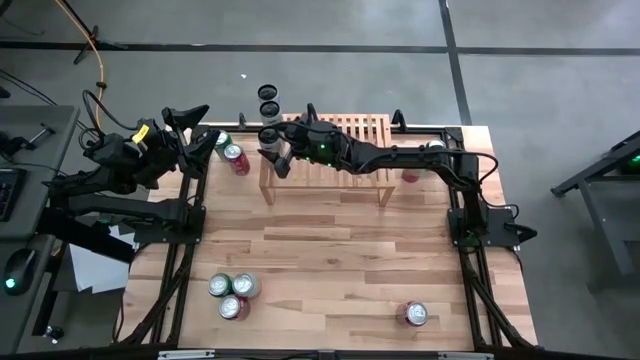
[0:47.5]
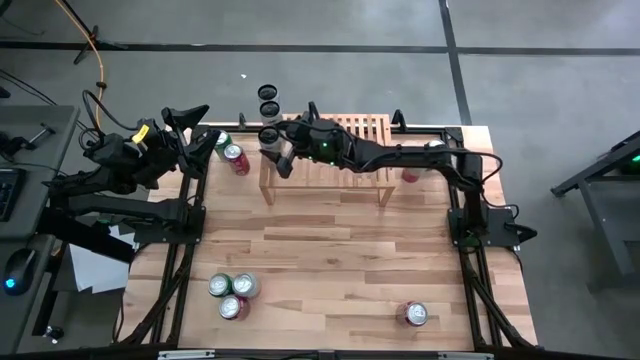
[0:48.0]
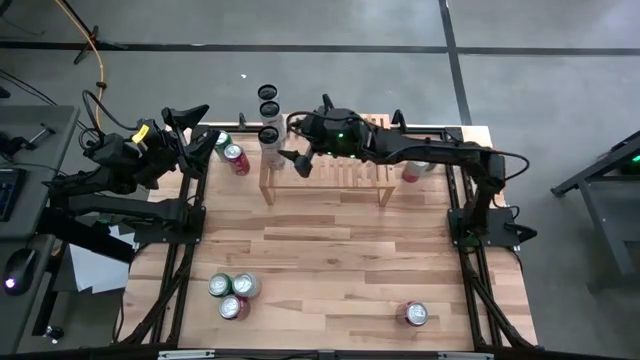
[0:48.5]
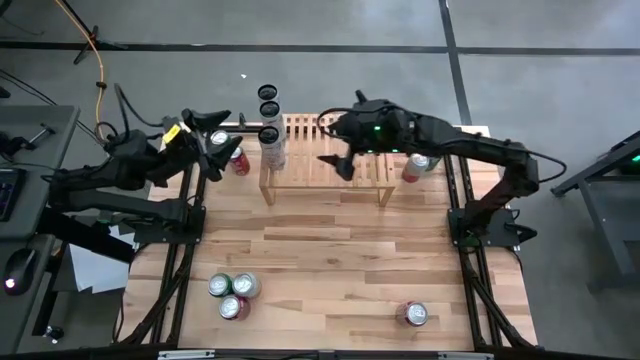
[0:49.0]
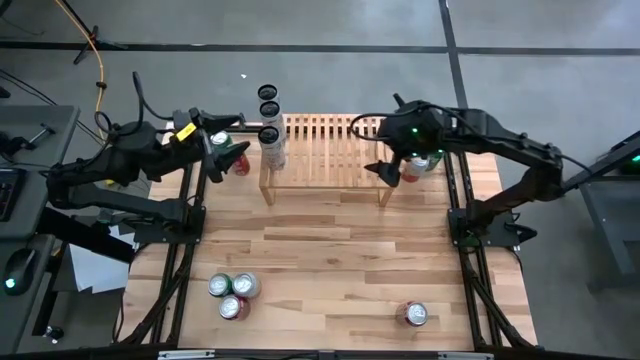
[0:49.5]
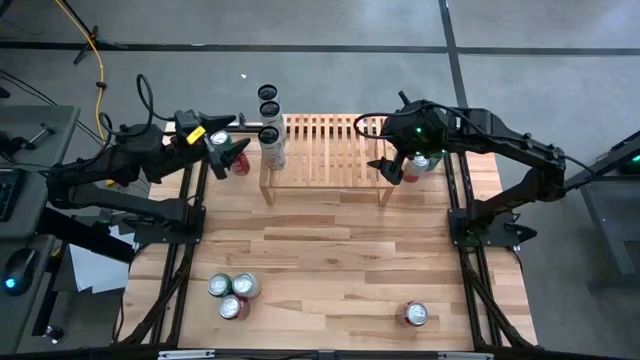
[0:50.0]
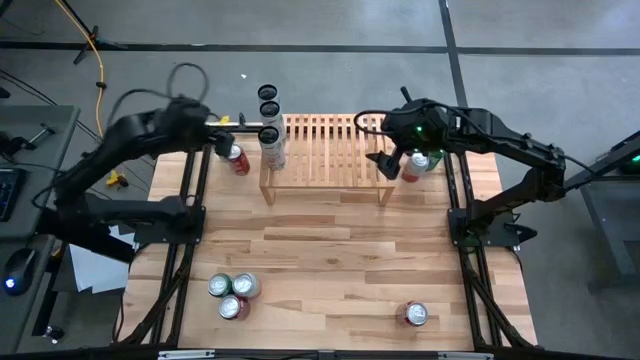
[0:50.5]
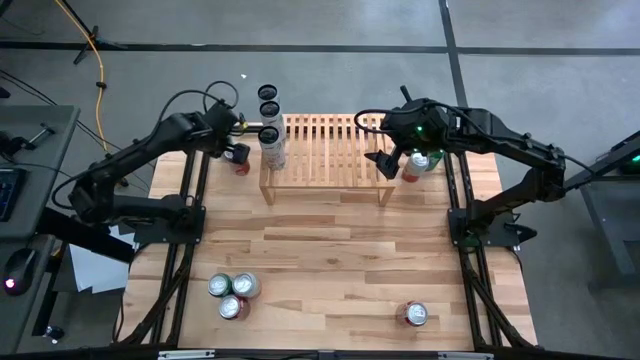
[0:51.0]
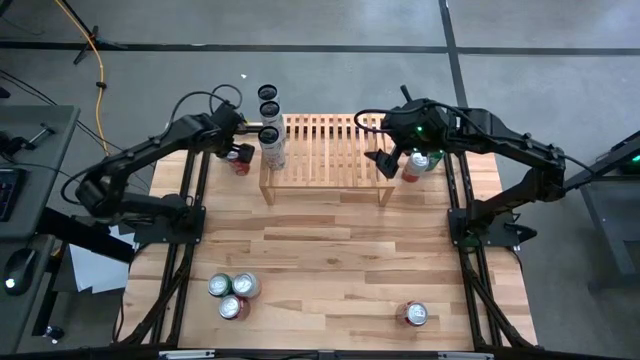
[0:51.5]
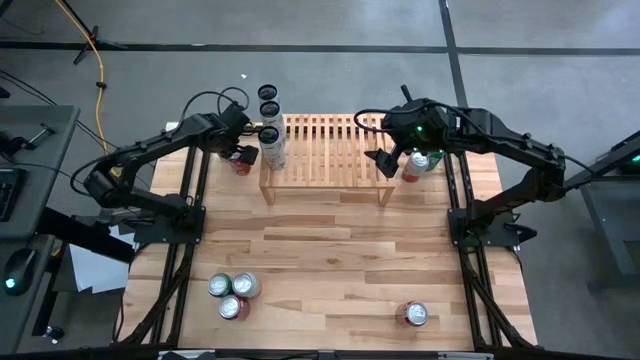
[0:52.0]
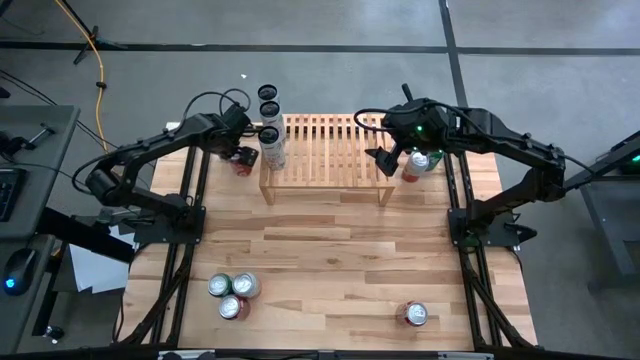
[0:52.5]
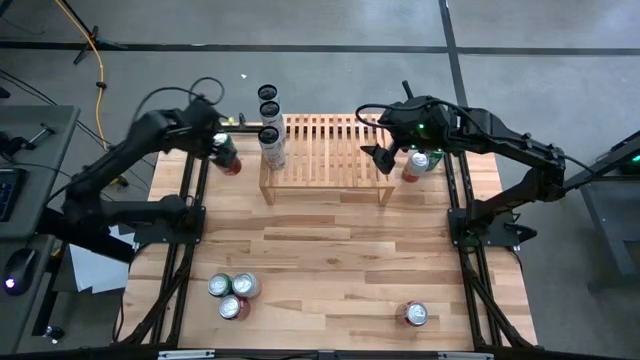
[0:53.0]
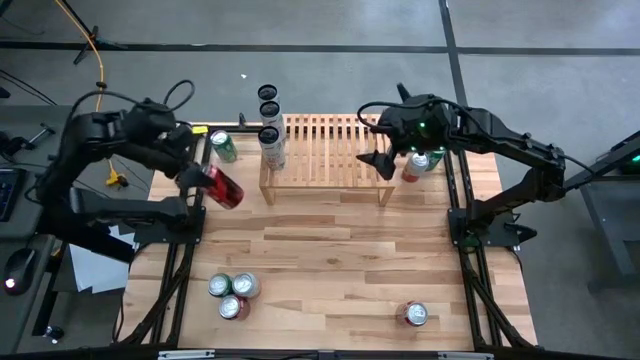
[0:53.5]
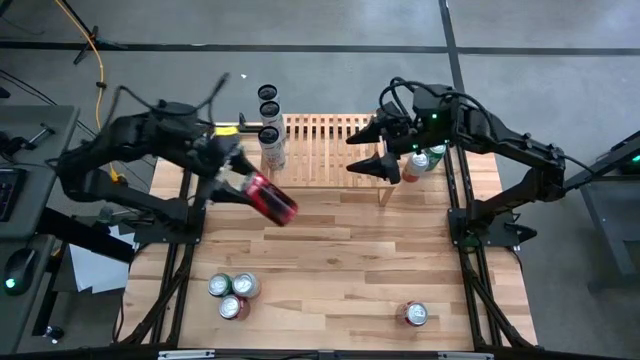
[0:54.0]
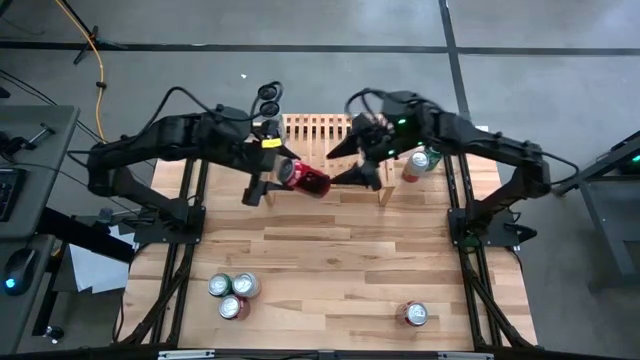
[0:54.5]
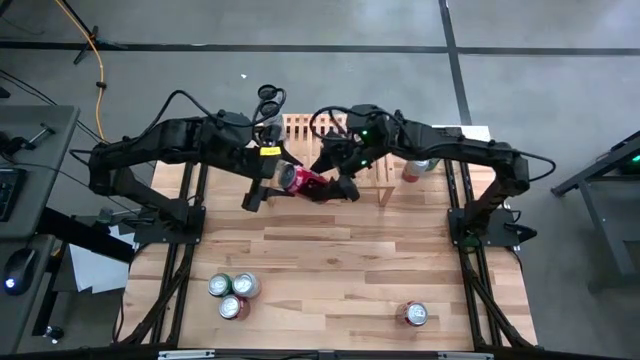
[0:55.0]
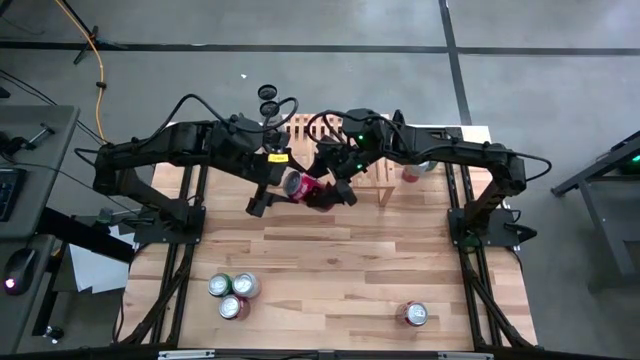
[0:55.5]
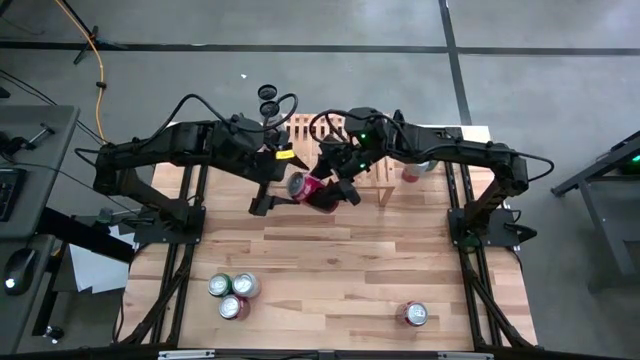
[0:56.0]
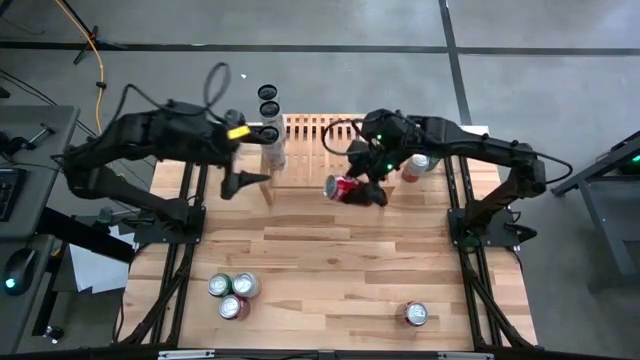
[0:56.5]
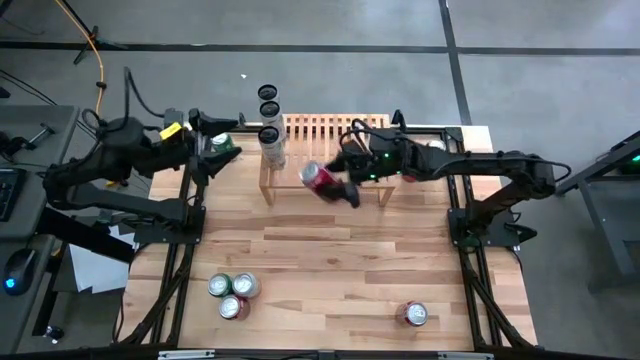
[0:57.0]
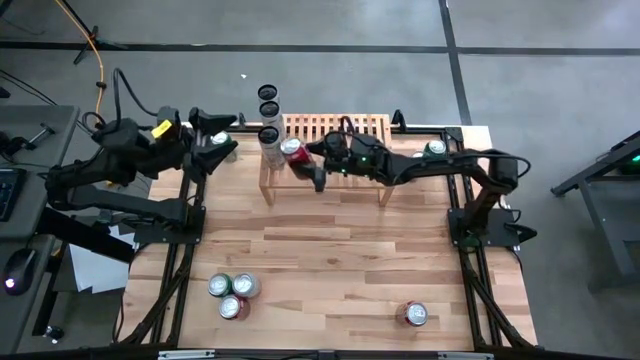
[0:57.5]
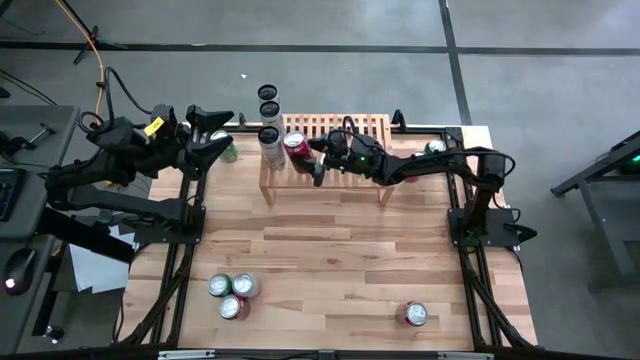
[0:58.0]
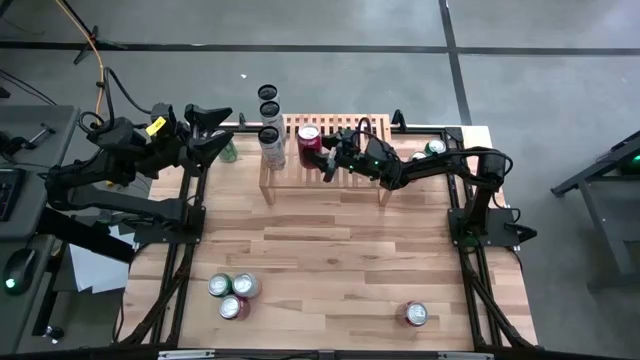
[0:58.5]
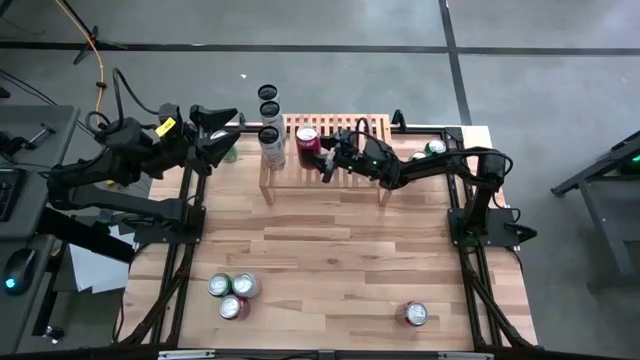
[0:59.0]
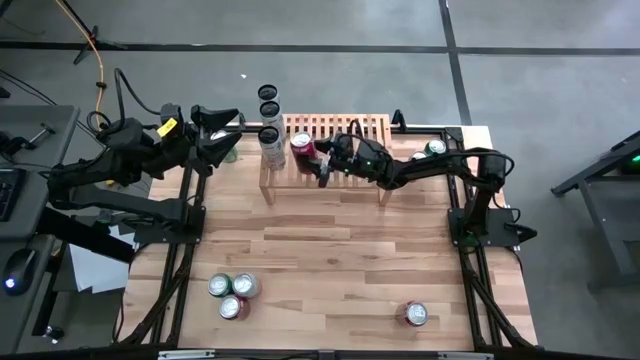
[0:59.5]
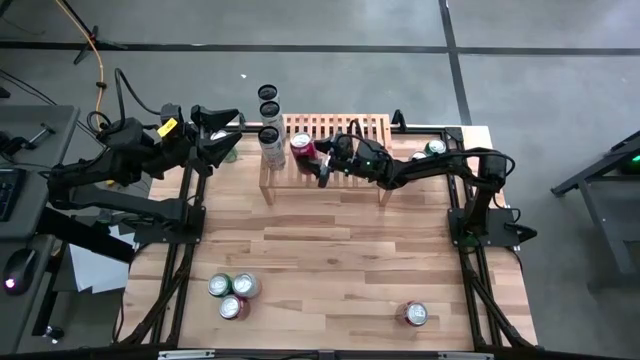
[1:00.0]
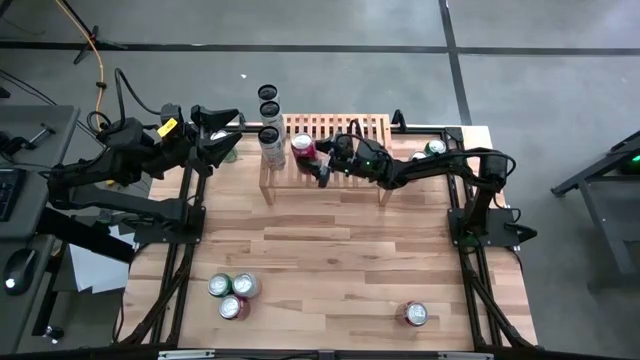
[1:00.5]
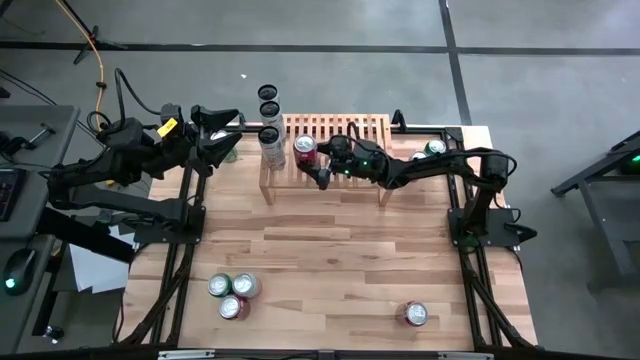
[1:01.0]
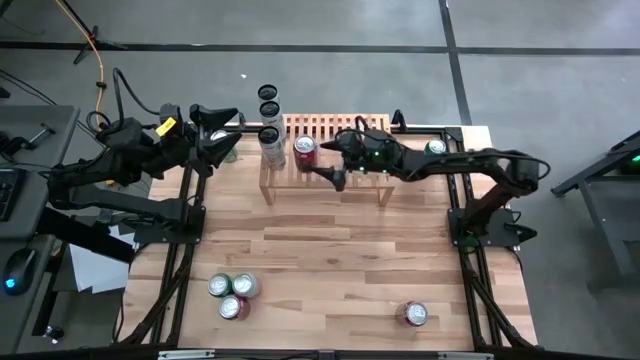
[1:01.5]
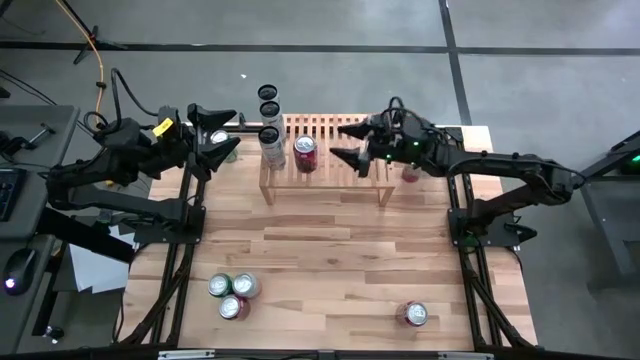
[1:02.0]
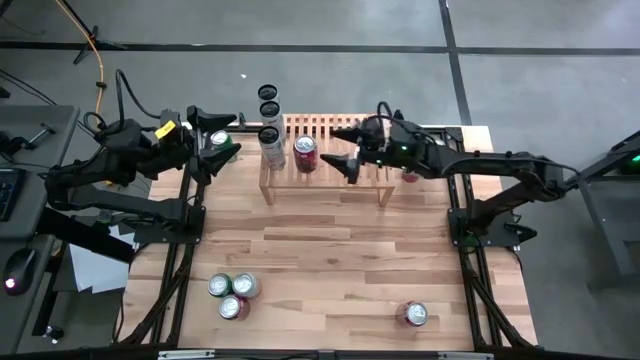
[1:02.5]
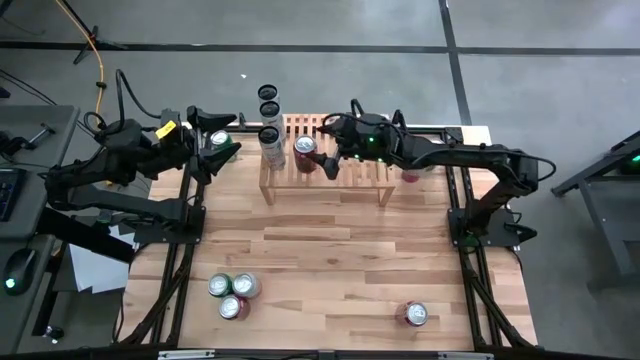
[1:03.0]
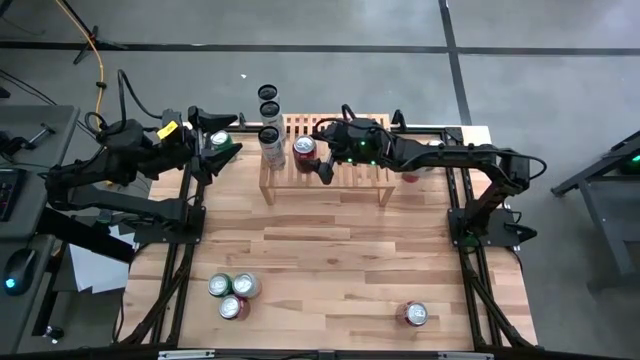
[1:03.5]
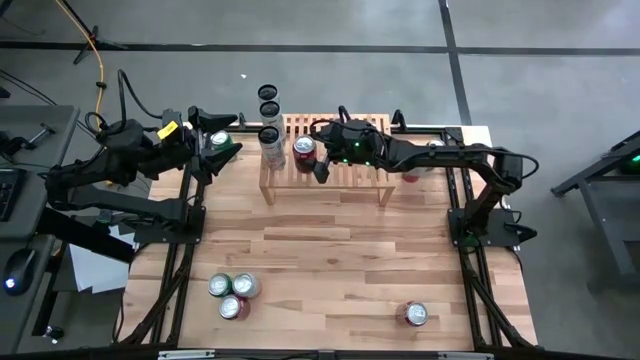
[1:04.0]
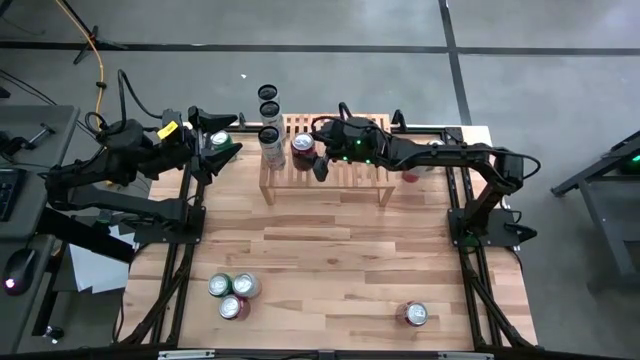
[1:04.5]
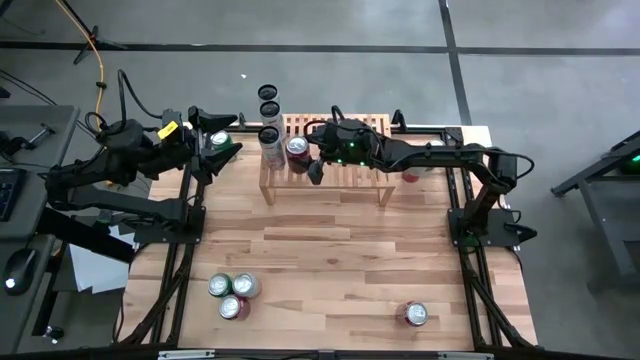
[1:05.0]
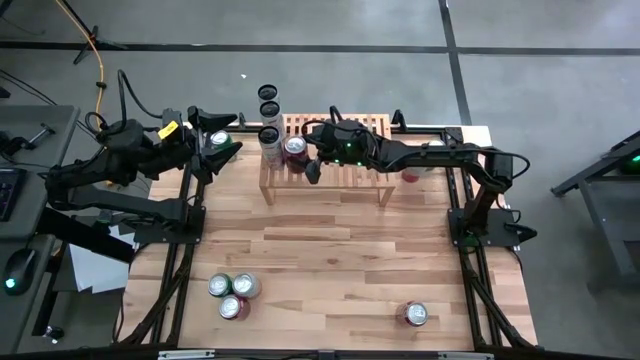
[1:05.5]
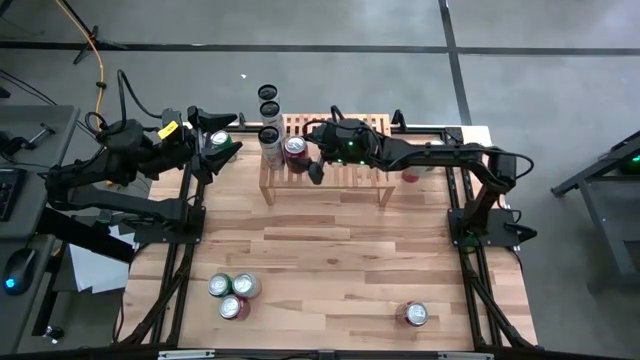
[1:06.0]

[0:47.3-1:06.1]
Task: Place canned beverage on shelf
Put the top left red-white soda can on the shelf

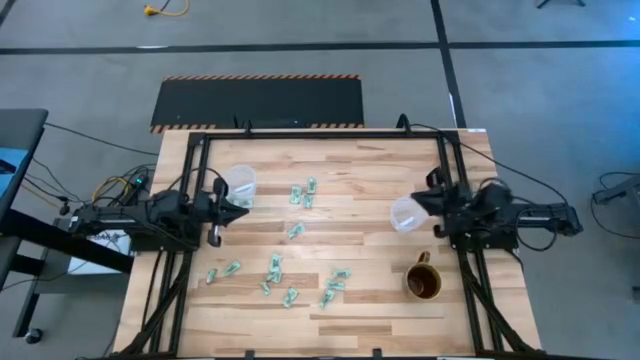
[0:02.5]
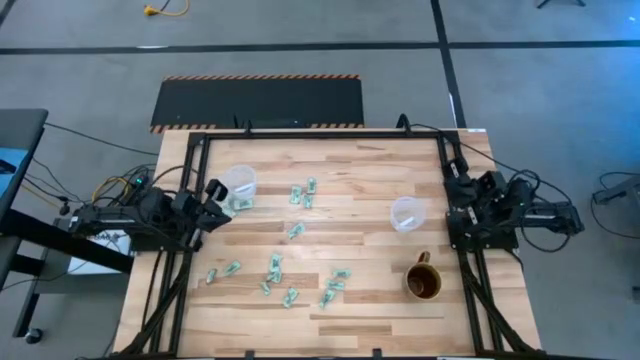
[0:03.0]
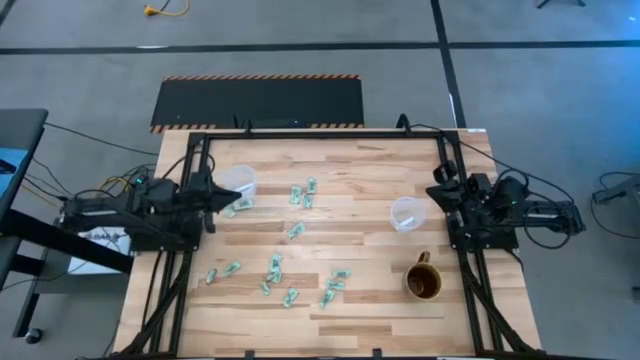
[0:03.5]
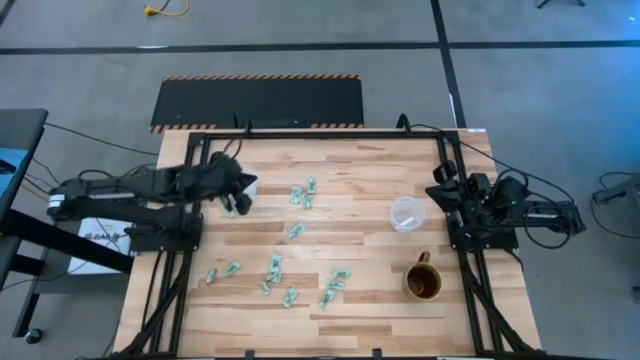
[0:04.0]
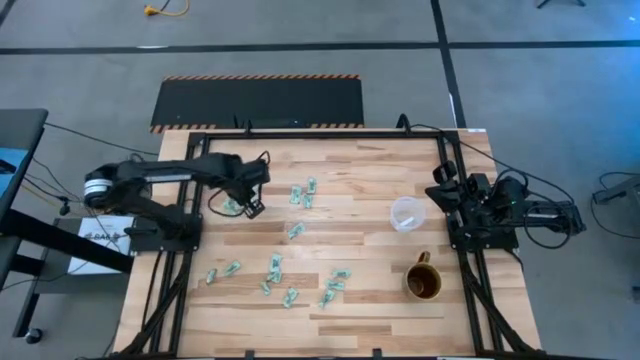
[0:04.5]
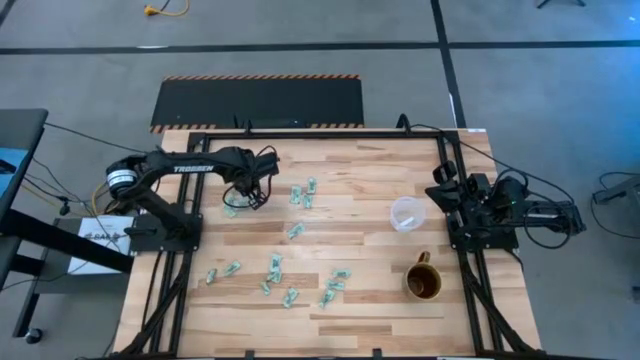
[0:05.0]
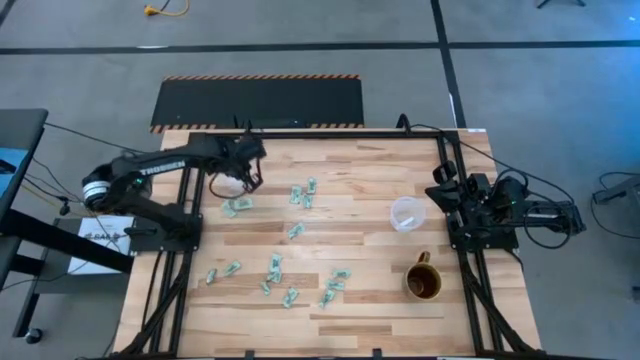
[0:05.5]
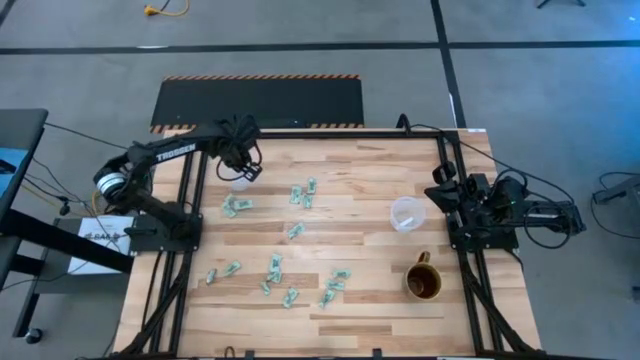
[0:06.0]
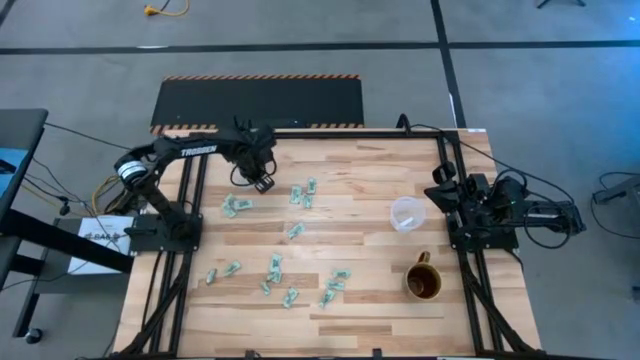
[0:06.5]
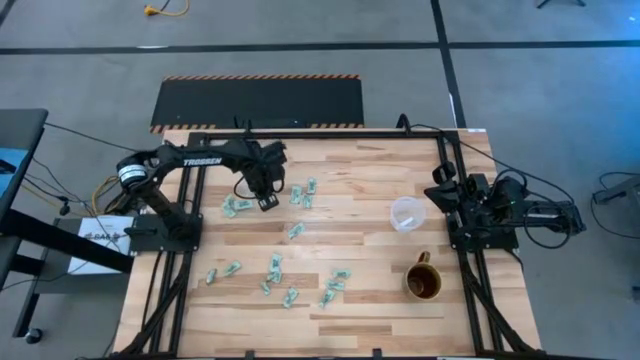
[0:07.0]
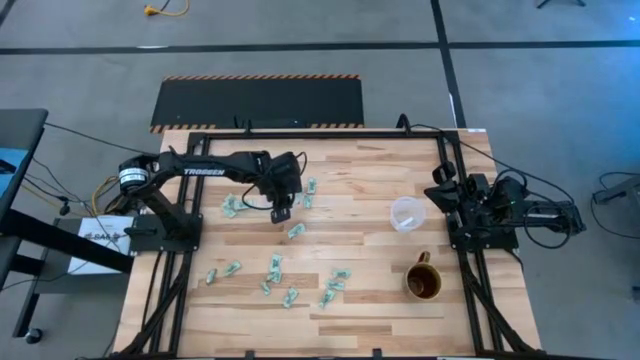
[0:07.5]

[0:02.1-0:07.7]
Task: Pick and place Stevia / Truvia into bins
Move the left container to the top middle of the table
